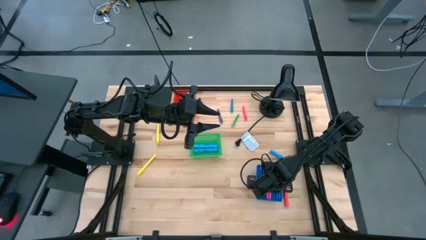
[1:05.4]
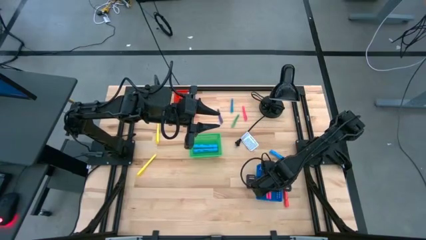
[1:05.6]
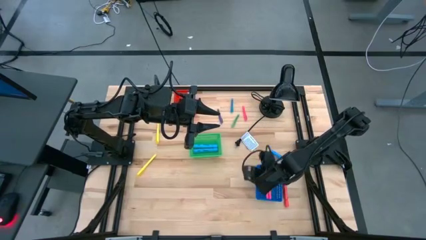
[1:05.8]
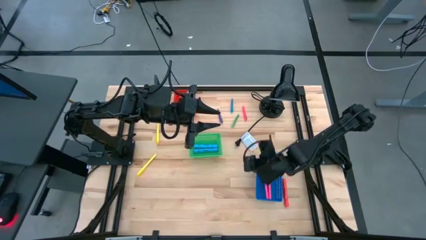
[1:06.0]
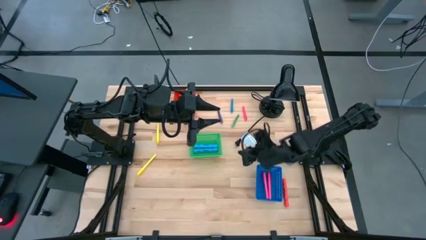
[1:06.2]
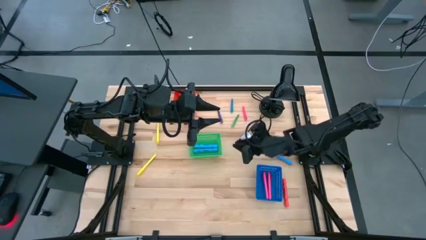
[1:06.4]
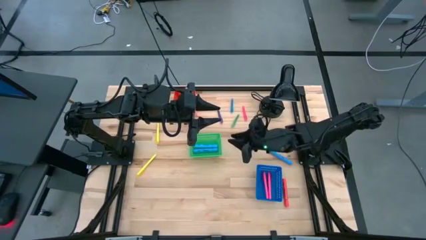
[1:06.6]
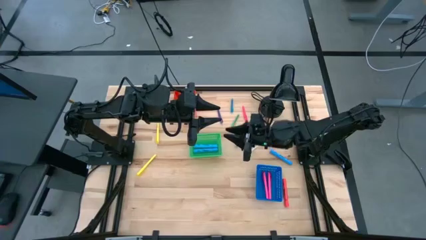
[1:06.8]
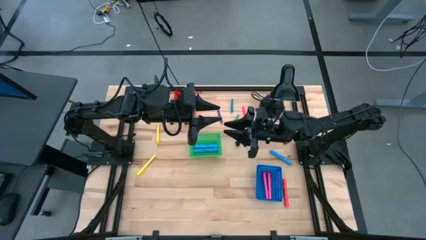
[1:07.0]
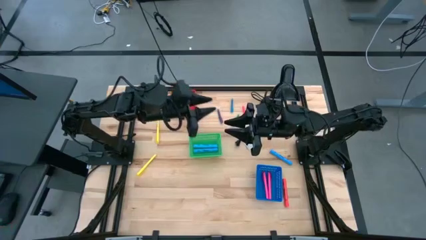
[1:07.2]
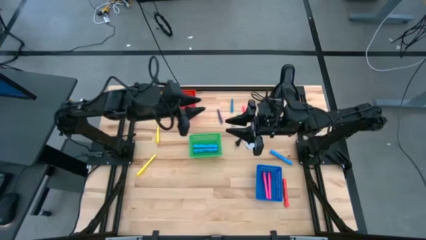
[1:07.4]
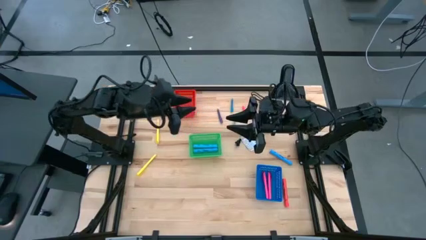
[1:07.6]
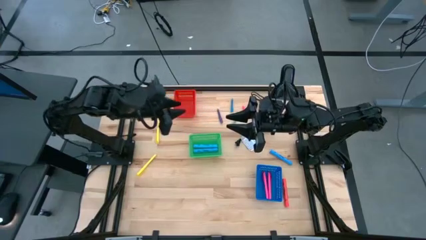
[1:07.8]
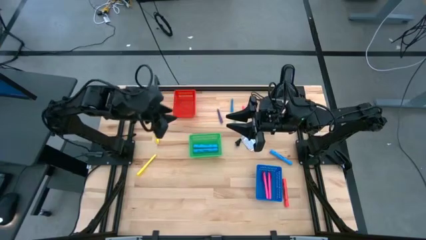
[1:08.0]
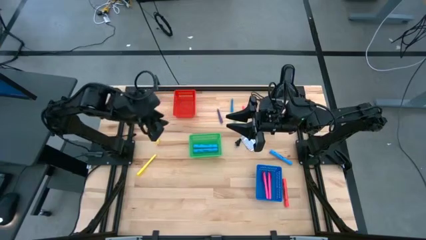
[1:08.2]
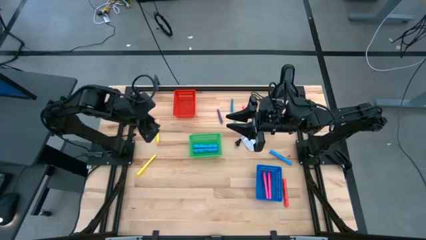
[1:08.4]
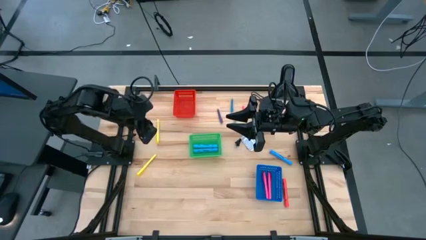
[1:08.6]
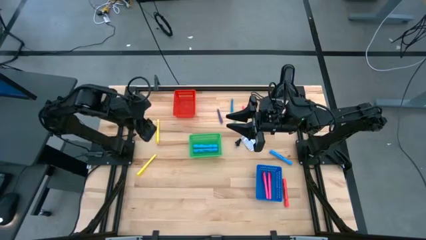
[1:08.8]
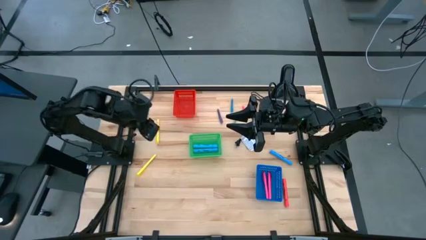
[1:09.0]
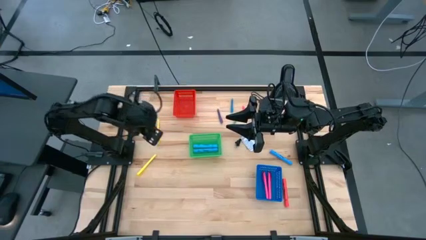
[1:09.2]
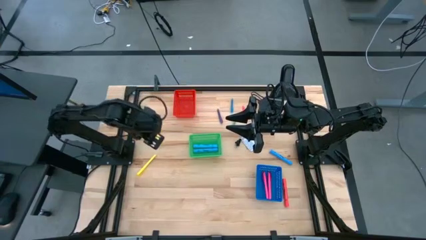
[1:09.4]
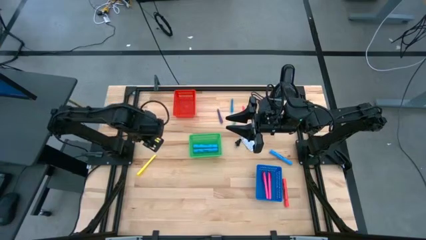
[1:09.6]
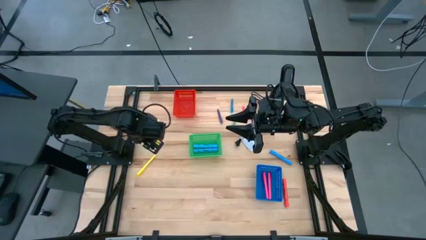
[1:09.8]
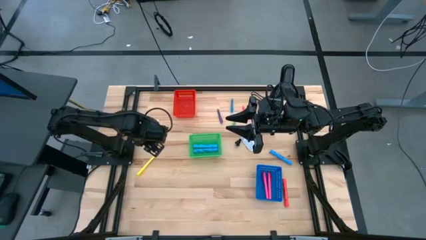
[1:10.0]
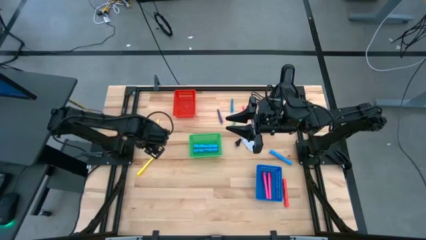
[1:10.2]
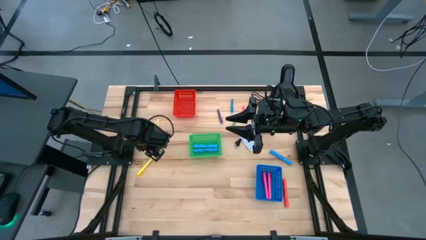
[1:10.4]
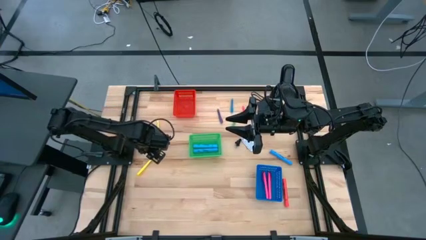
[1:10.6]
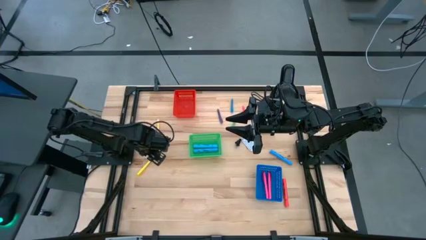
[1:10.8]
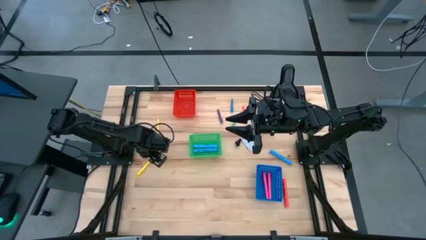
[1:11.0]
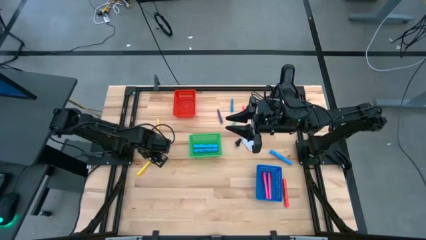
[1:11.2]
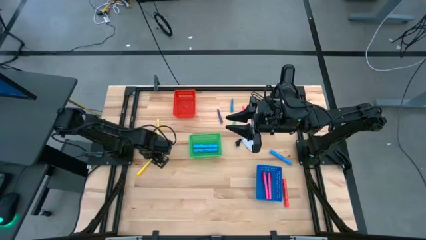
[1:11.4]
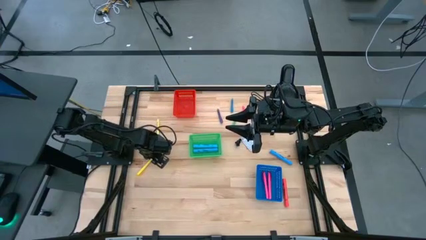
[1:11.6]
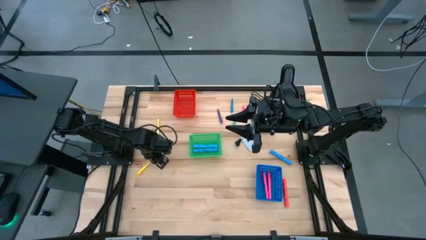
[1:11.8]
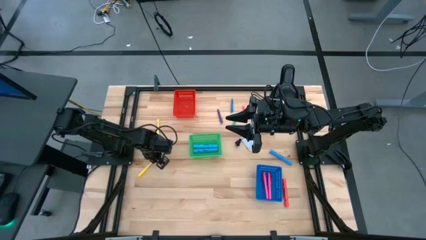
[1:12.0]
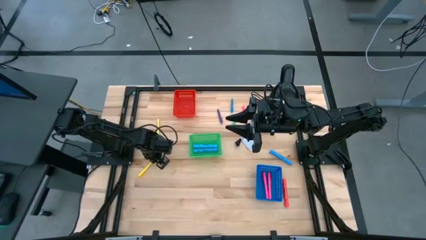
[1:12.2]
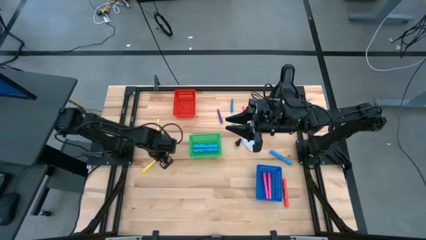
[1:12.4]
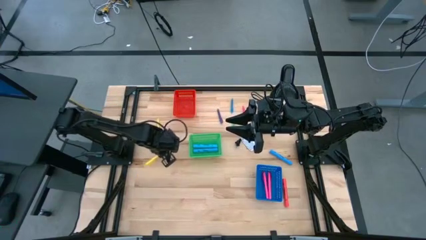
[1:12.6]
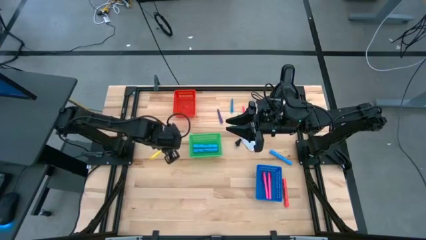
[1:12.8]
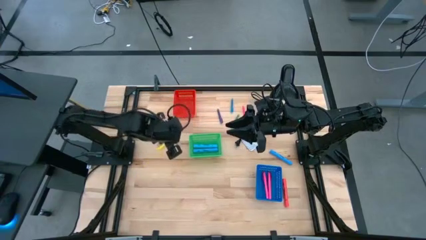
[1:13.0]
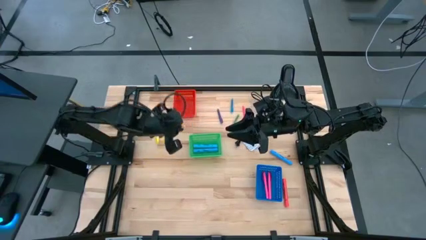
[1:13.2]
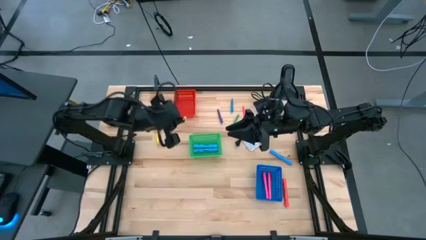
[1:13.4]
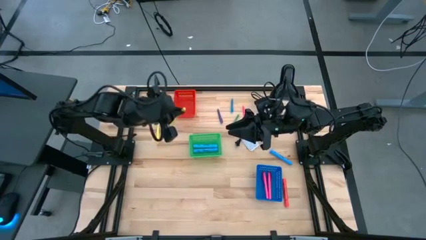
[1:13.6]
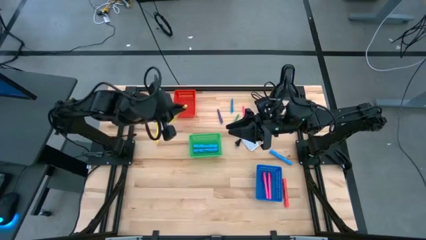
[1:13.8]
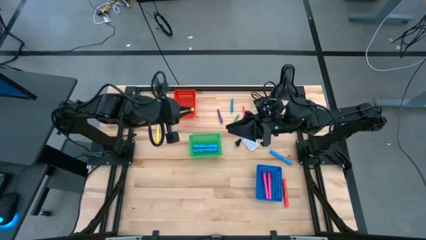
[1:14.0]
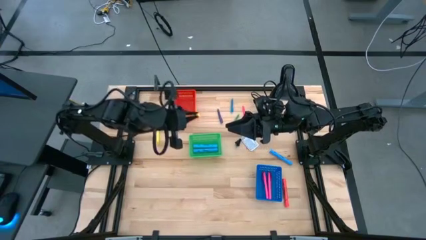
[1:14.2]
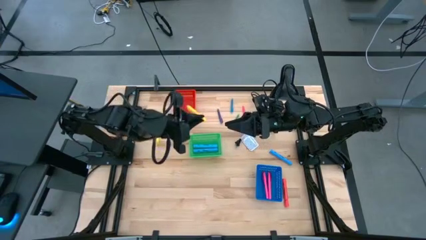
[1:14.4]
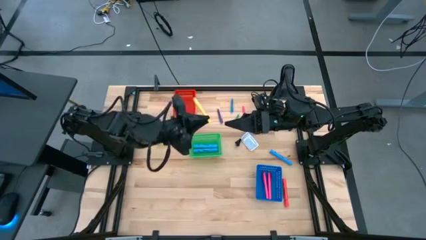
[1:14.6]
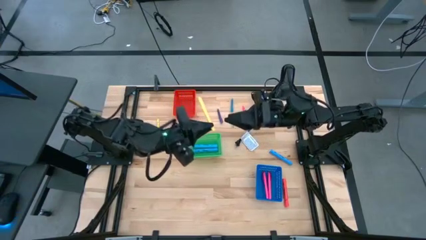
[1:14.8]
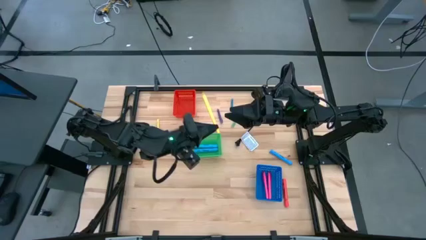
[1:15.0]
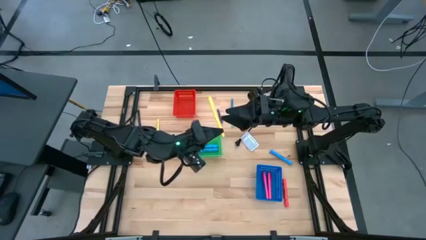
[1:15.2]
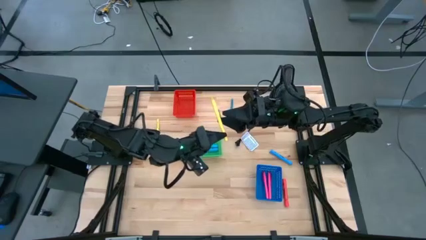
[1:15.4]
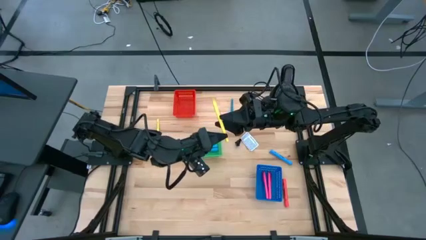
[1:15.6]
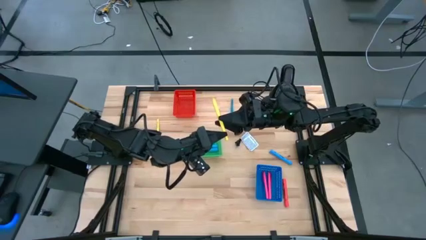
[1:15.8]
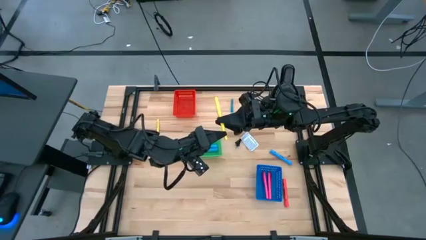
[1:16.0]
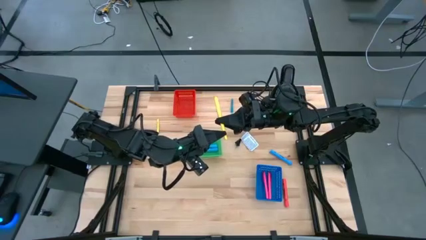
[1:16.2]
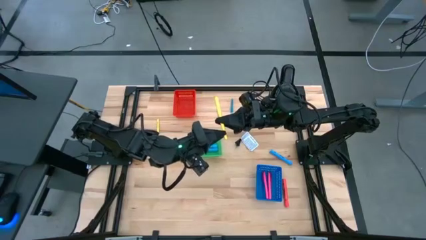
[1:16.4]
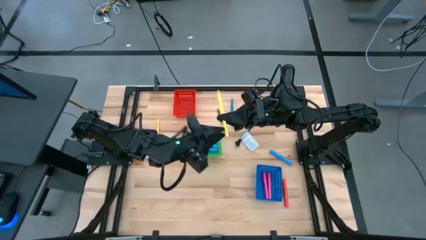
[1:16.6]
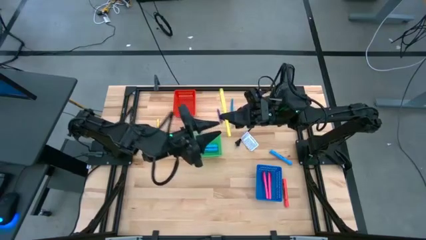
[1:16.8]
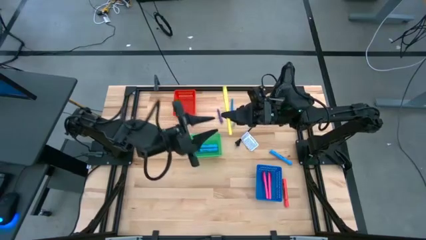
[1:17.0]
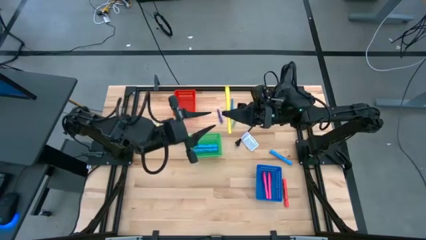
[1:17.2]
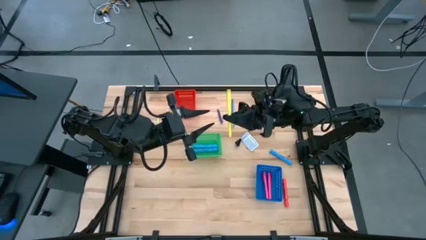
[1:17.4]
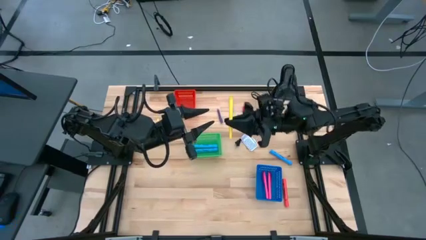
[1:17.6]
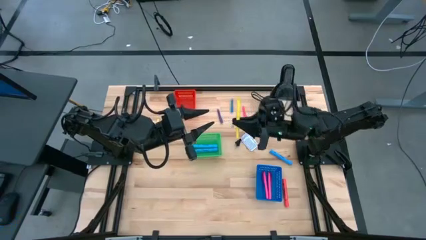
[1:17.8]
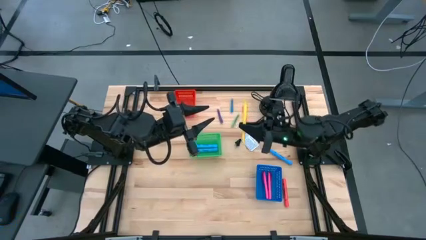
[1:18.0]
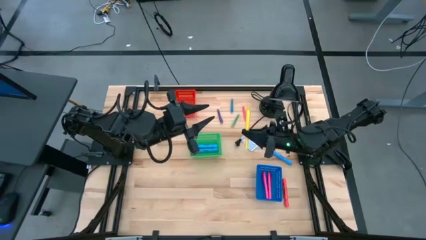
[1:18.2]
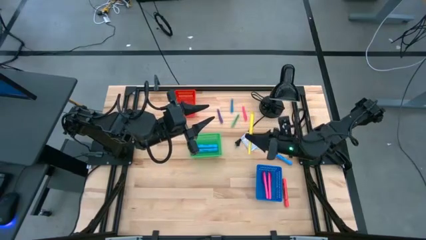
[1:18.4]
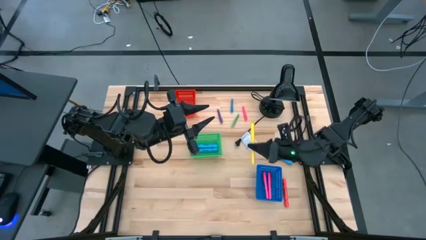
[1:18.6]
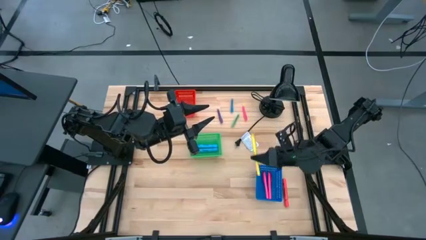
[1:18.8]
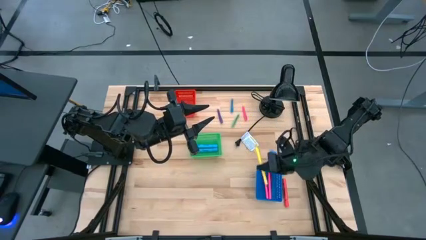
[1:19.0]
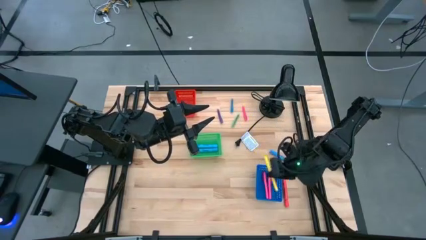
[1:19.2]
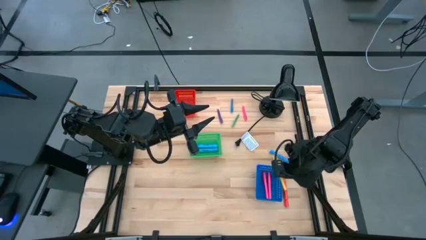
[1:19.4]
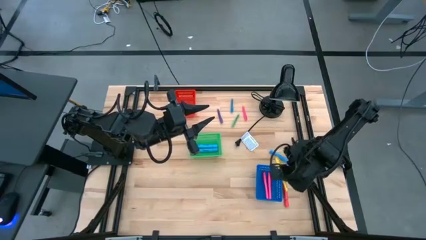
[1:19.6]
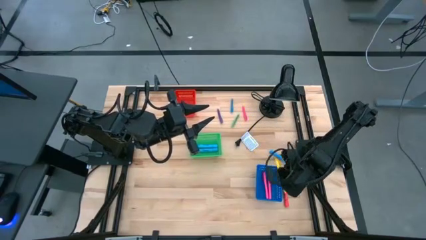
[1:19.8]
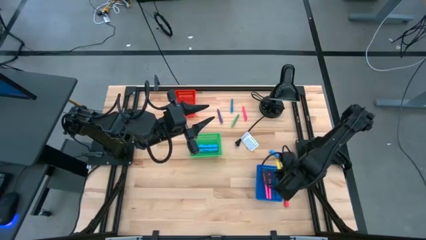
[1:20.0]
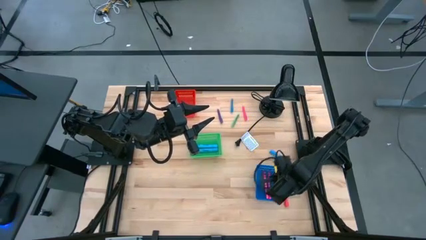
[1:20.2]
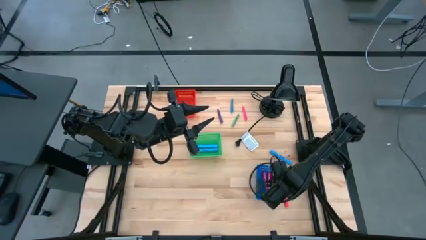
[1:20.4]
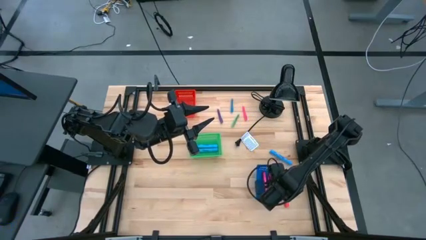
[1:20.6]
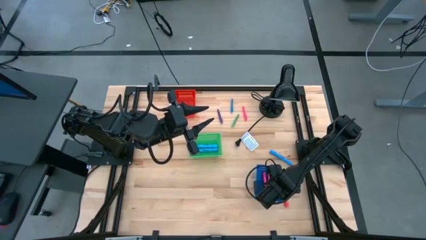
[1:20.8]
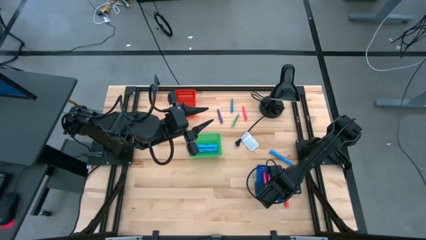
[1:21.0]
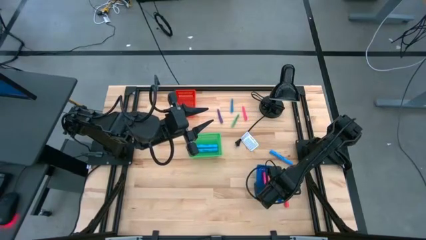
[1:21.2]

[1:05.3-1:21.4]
Task: Pick & Place Markers
Put the bottom large yellow pen into the blue bin
